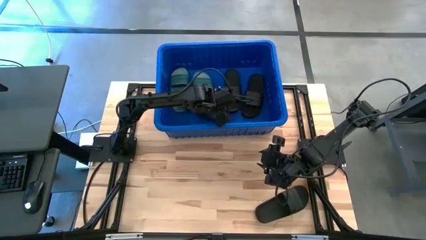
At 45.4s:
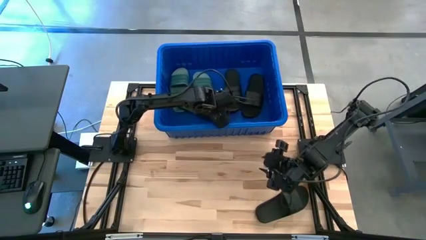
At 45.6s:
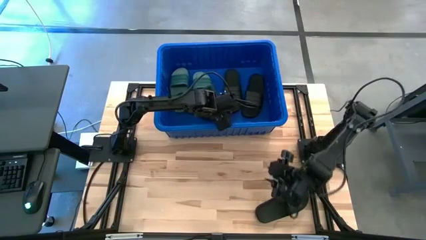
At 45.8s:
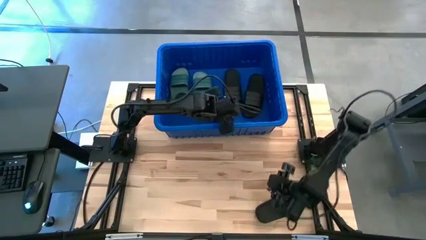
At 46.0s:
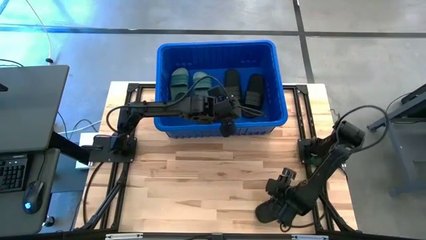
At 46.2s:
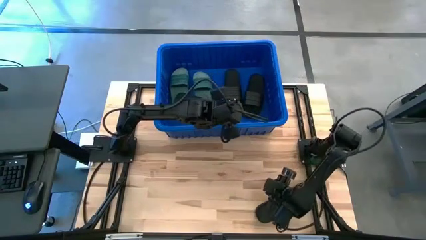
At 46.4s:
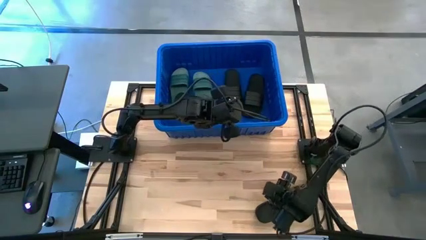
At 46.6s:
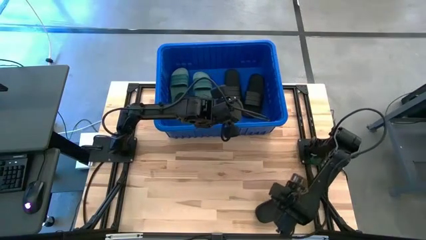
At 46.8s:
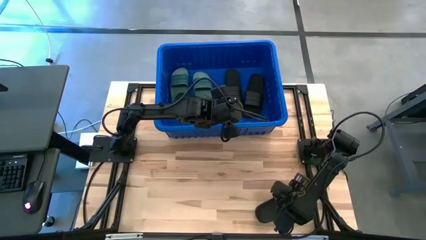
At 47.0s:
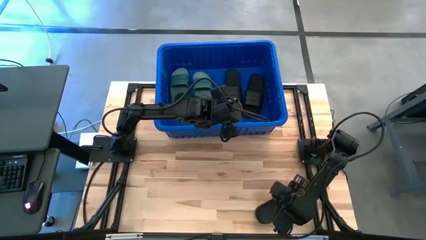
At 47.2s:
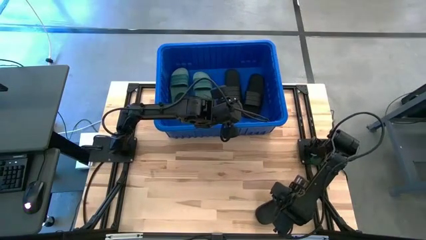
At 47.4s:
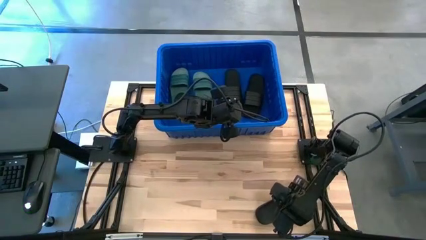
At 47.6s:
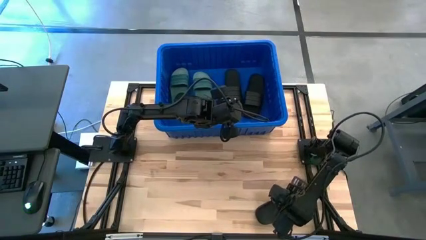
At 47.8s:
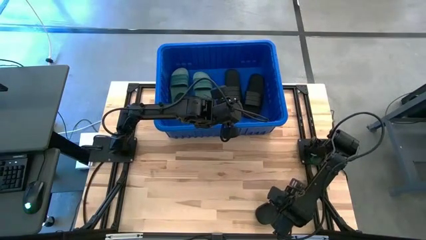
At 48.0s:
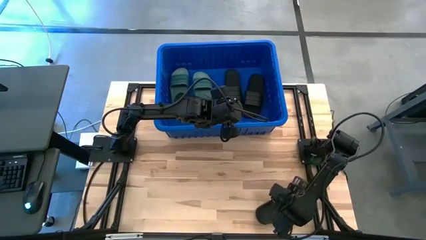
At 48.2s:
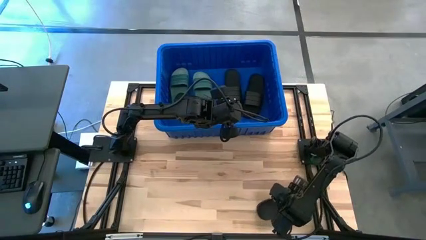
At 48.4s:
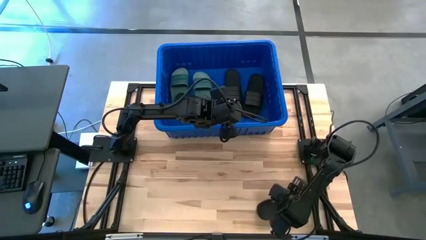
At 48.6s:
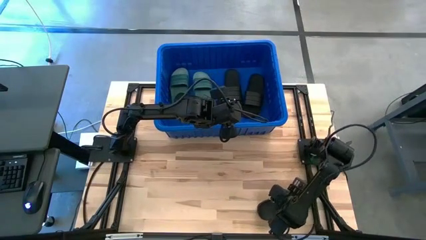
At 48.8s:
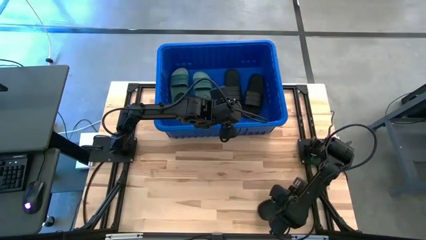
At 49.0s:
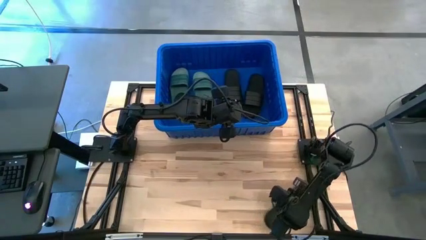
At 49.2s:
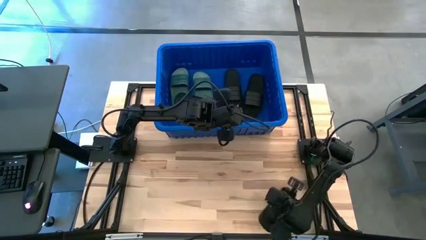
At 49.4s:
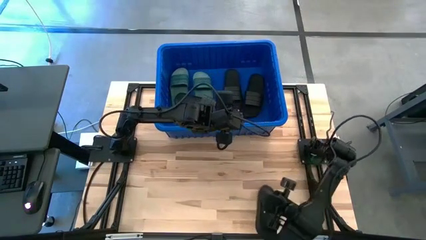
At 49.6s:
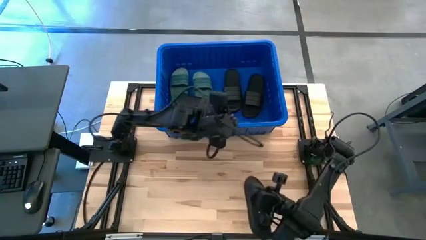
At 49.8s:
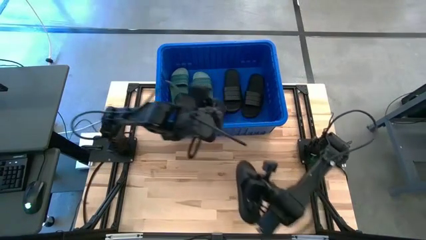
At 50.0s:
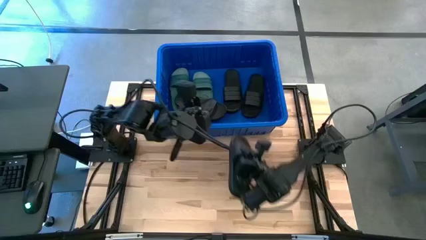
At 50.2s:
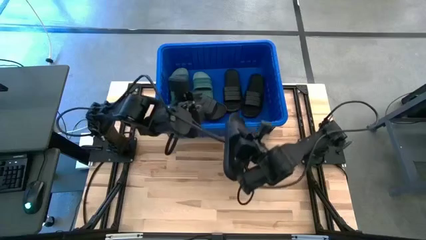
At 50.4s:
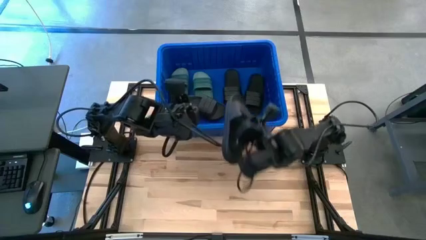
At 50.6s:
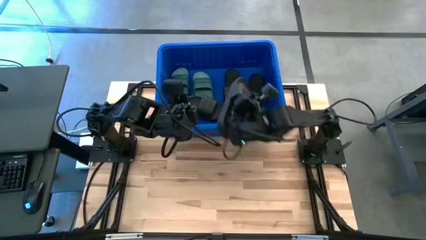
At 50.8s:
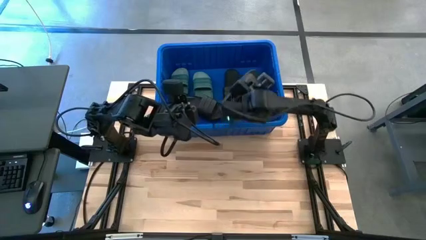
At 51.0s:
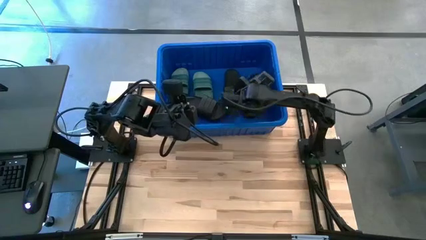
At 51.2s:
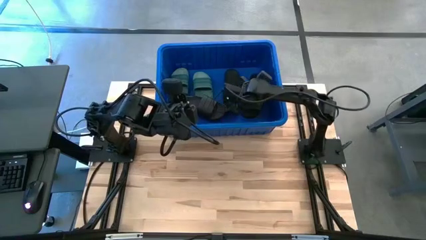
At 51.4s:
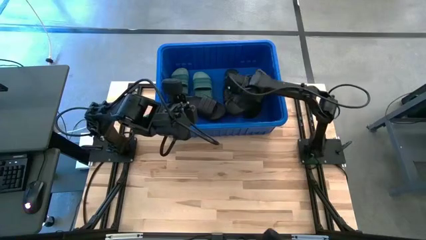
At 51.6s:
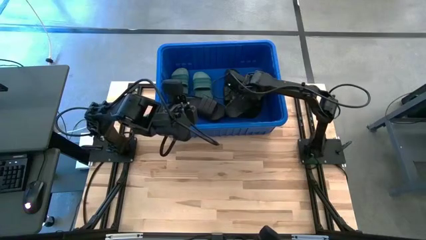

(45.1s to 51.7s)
Task: Pick and place slides into bin
Put the black slide into the blue bin

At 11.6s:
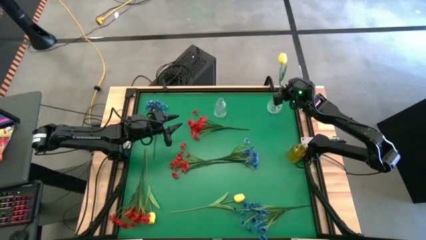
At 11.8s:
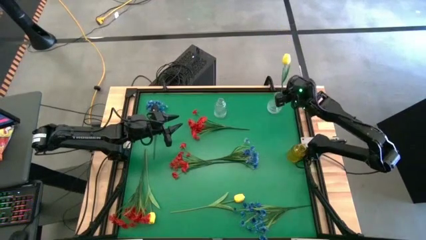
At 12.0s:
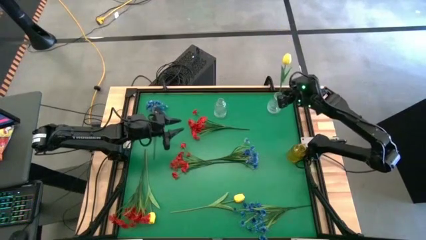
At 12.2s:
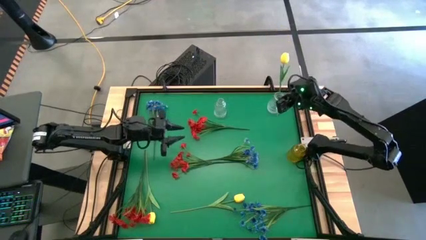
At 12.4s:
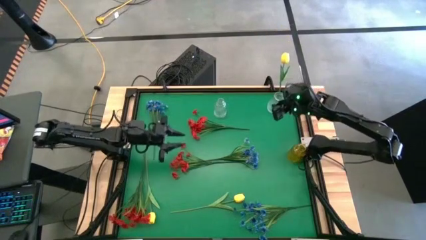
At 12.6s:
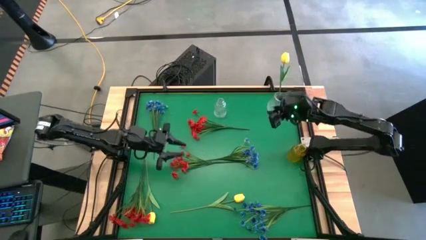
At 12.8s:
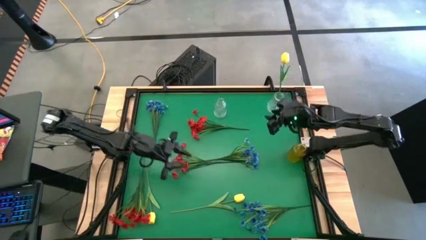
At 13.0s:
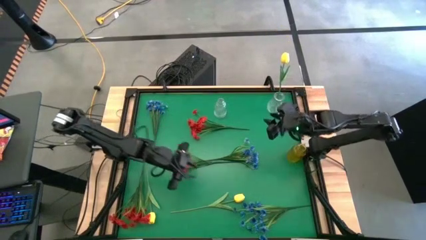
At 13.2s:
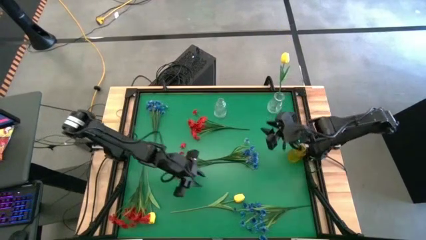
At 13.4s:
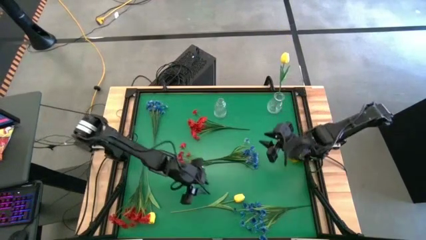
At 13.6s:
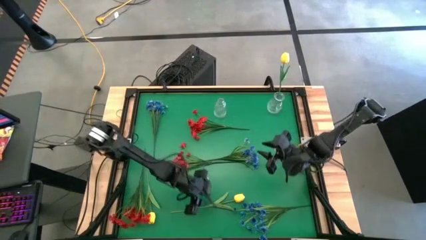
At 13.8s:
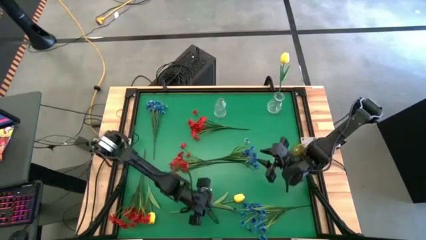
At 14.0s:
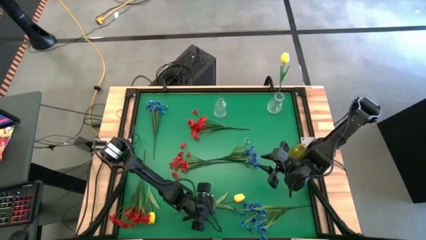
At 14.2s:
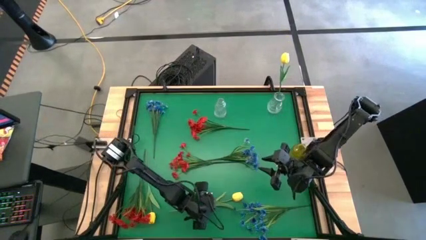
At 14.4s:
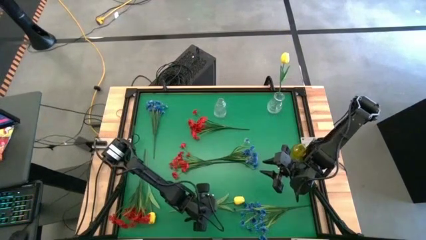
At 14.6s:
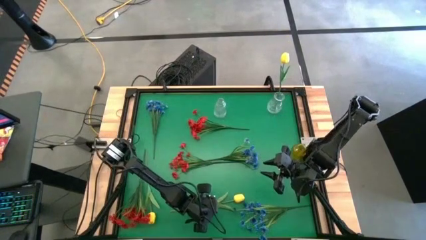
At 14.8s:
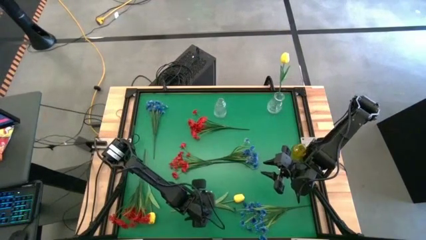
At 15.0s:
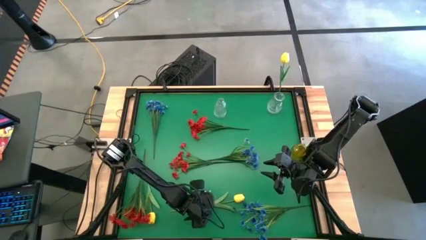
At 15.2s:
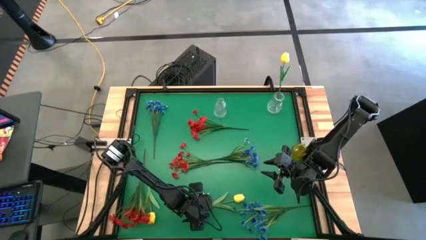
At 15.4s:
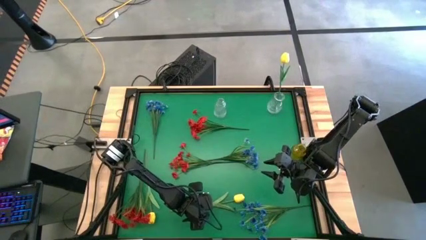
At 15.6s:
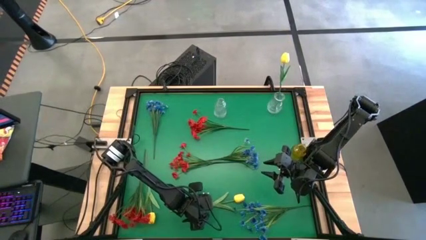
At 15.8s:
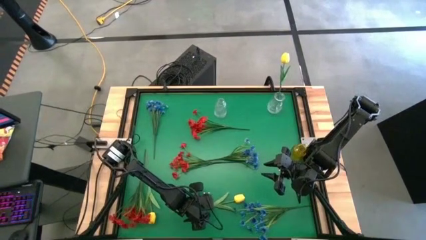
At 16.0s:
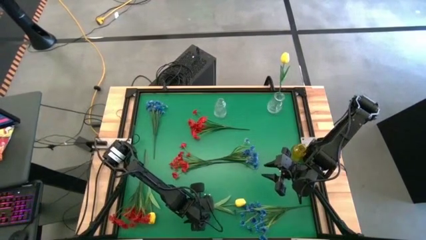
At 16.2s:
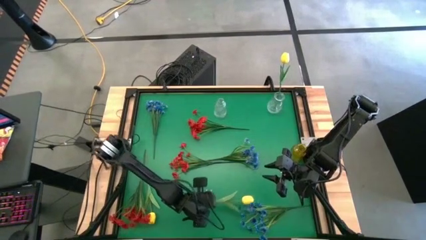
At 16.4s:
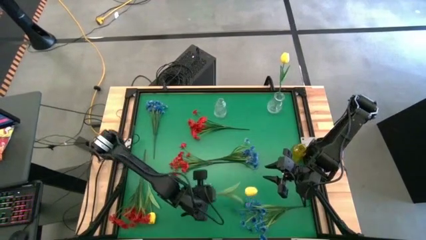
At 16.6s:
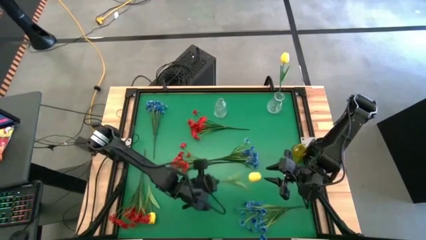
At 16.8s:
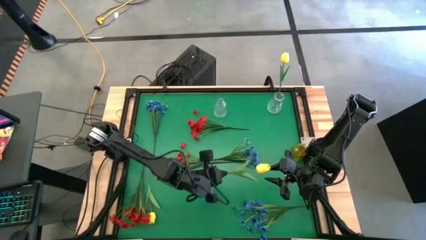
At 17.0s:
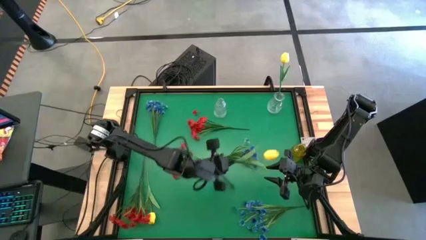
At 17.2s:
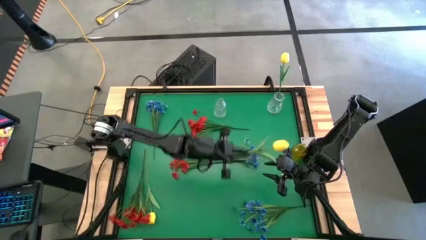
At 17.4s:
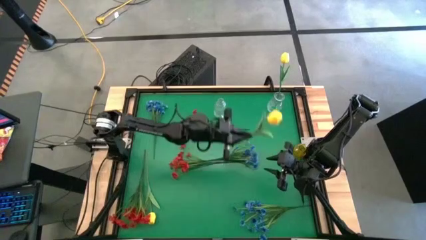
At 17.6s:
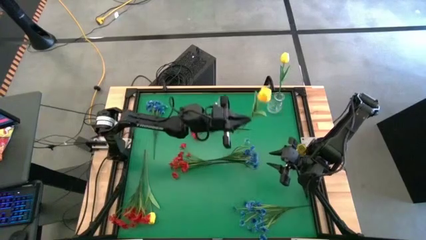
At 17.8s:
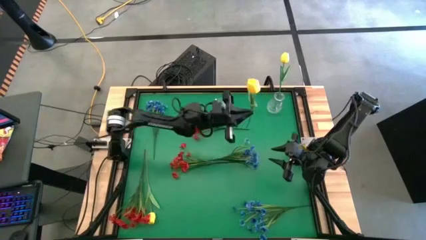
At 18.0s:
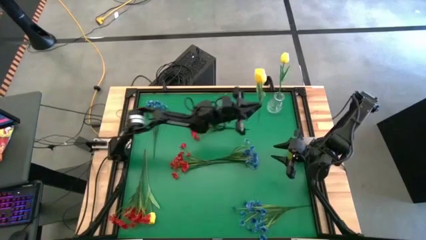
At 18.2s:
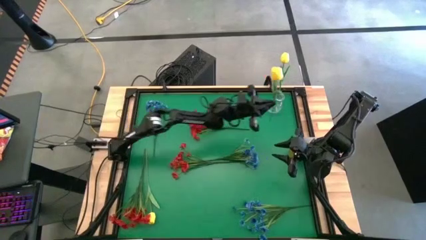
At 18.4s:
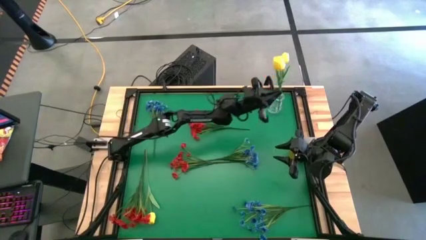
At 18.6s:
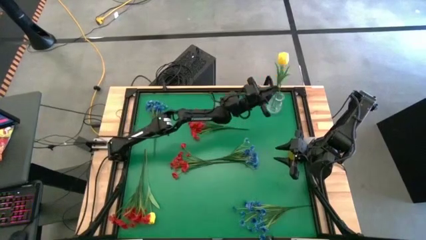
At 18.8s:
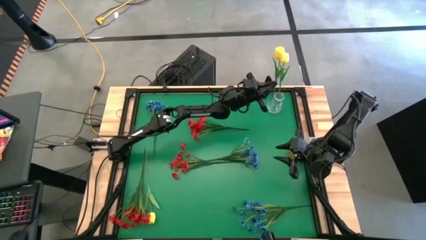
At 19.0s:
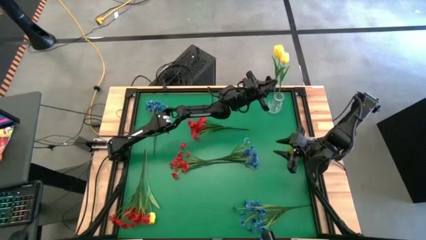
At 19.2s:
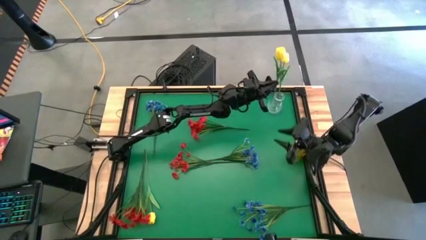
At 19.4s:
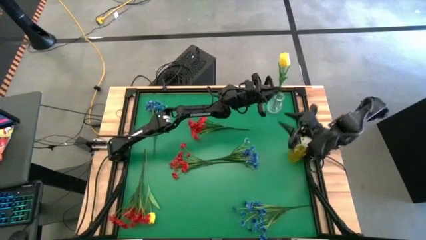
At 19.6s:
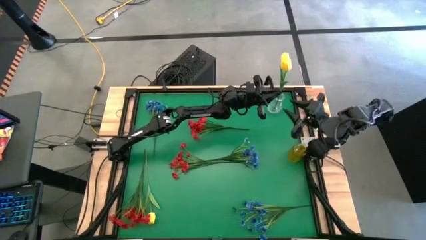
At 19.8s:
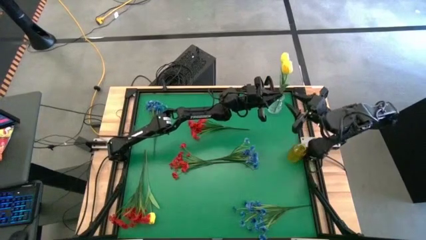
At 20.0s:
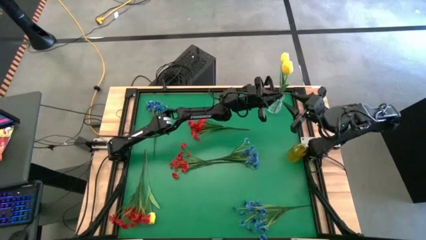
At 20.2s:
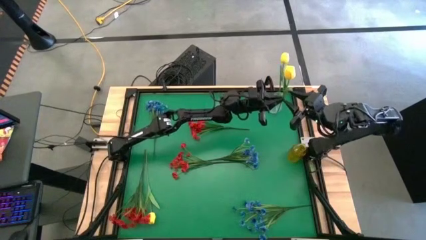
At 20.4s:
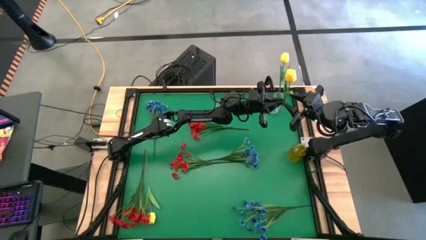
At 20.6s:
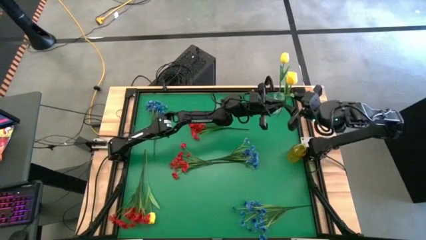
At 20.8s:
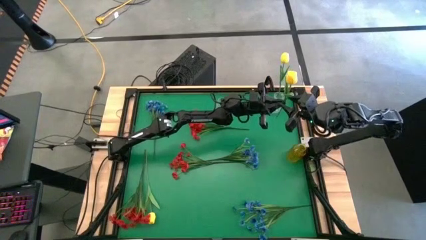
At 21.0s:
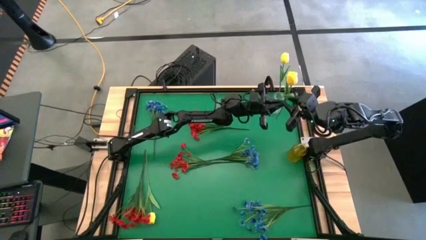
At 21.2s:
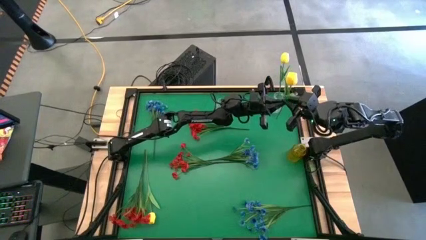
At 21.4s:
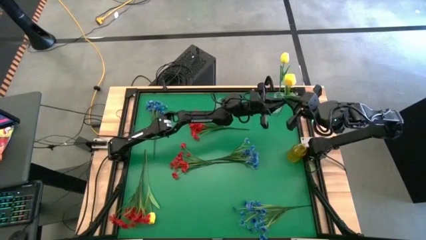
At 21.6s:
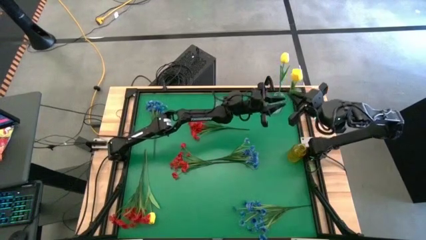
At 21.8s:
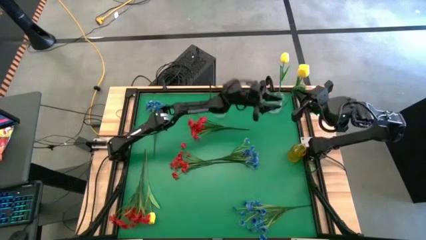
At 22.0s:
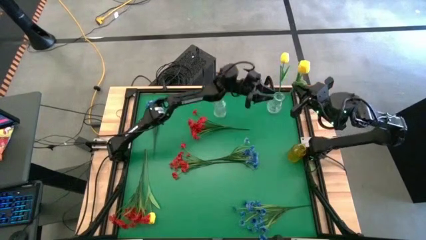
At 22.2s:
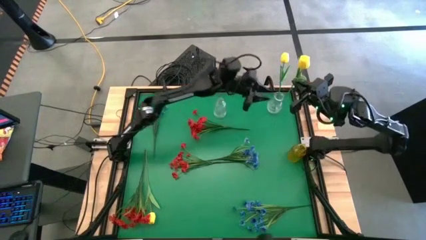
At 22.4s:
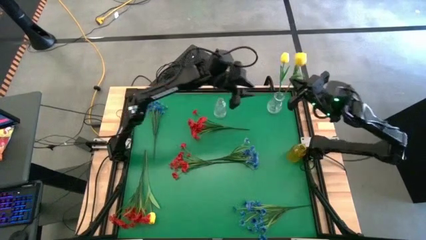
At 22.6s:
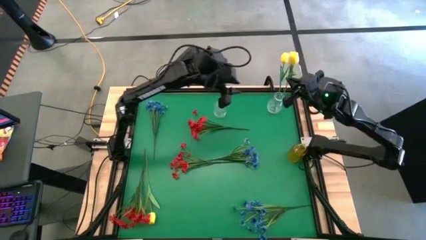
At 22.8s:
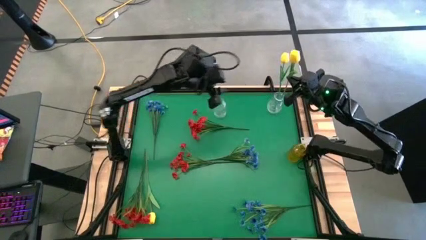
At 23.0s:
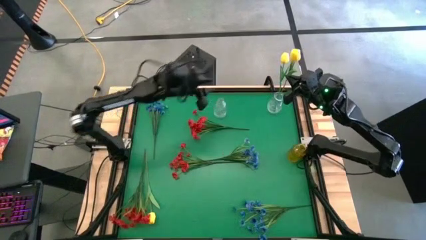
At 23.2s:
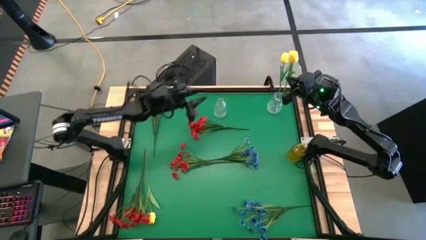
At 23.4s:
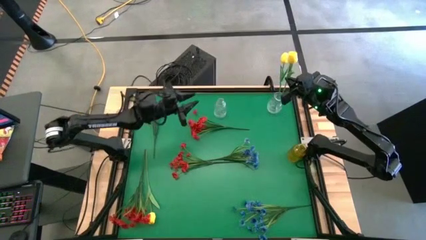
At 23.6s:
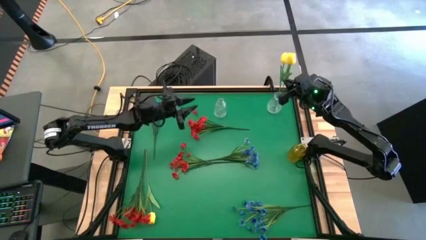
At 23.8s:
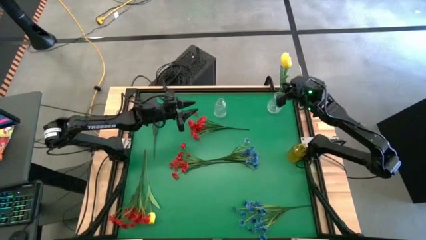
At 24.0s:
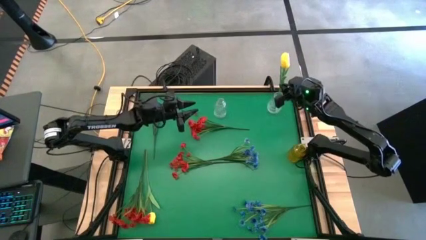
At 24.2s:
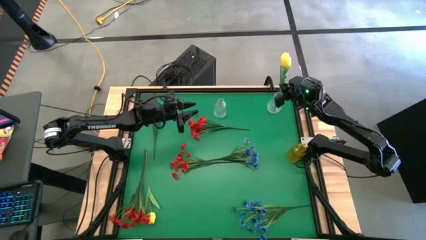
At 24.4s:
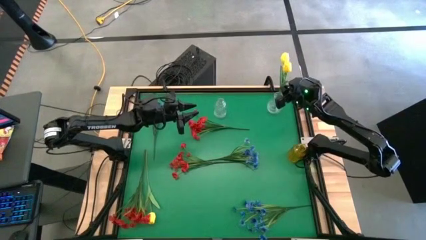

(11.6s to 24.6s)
Task: Sort flowers into vase by color
Put the right yellow flower into the right white transparent vase
